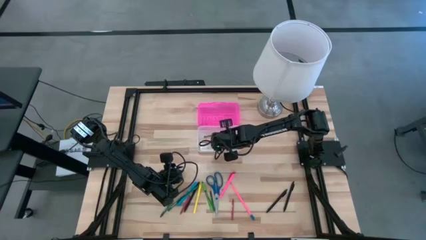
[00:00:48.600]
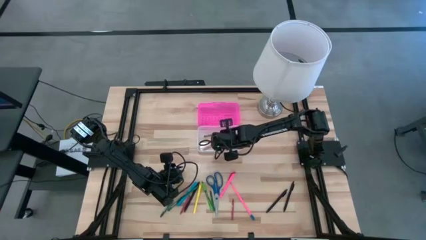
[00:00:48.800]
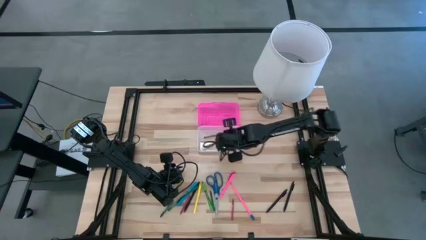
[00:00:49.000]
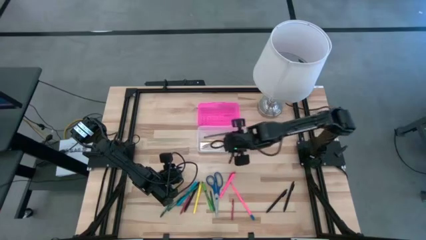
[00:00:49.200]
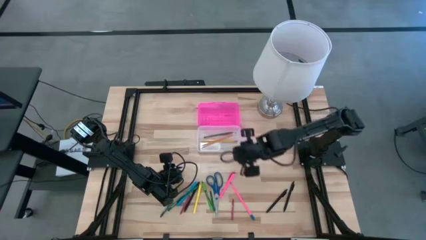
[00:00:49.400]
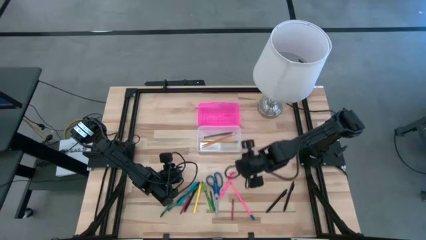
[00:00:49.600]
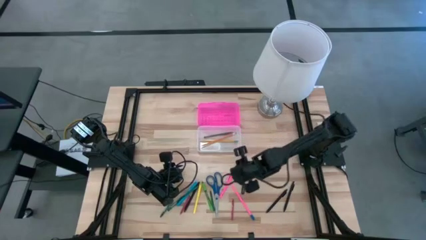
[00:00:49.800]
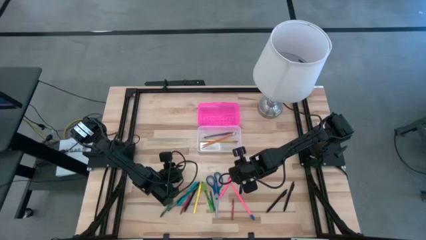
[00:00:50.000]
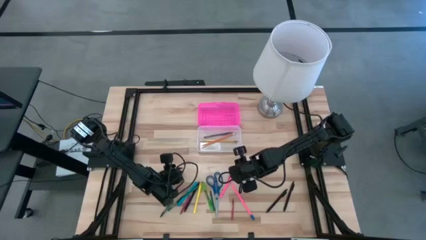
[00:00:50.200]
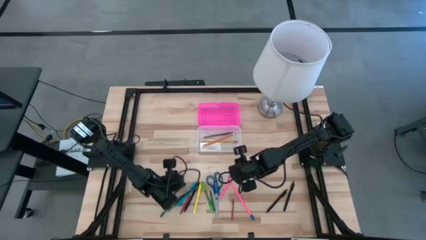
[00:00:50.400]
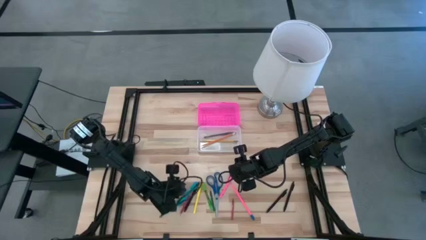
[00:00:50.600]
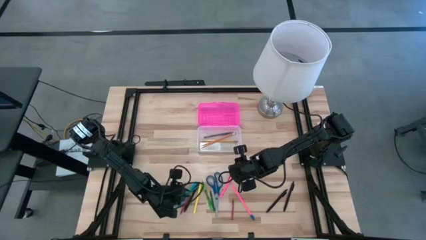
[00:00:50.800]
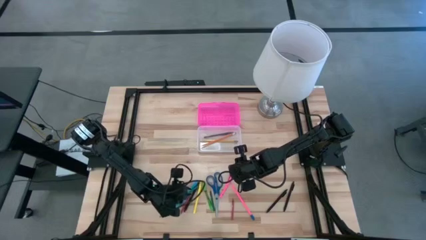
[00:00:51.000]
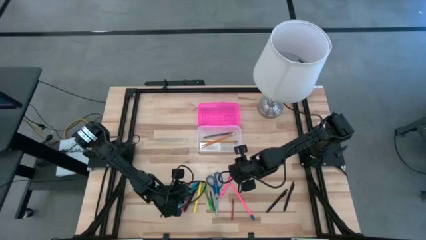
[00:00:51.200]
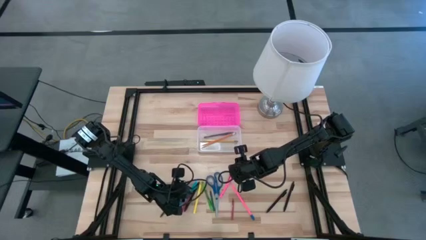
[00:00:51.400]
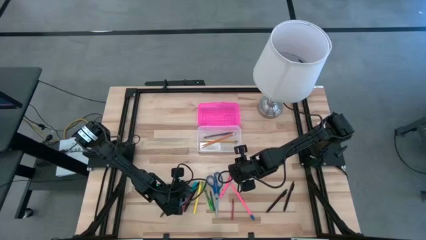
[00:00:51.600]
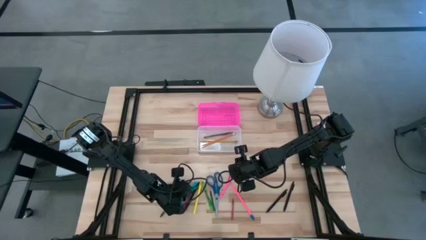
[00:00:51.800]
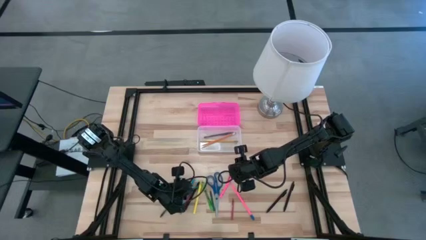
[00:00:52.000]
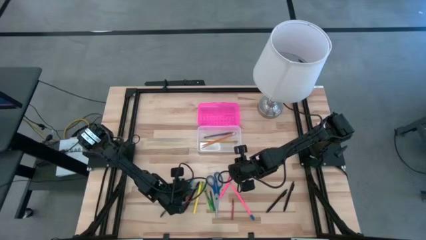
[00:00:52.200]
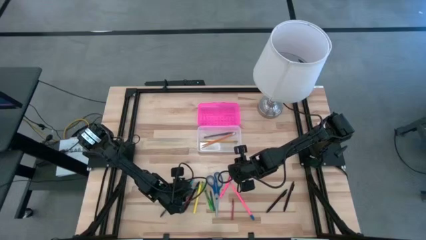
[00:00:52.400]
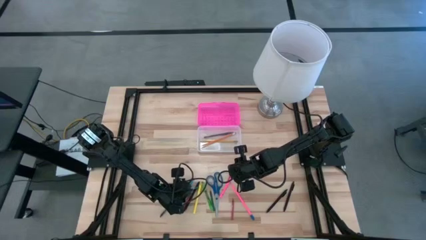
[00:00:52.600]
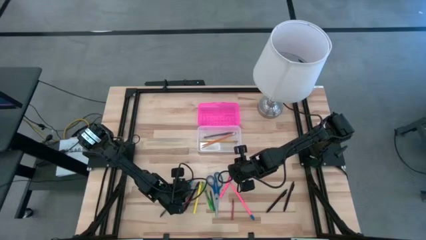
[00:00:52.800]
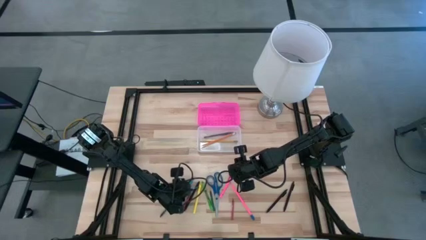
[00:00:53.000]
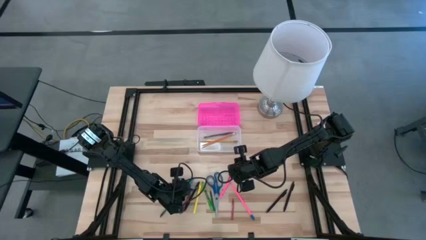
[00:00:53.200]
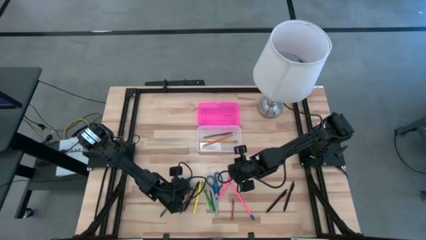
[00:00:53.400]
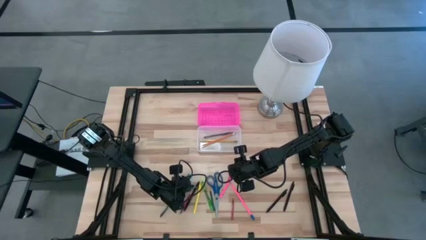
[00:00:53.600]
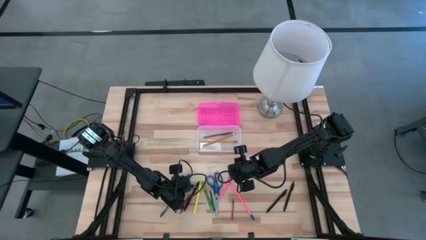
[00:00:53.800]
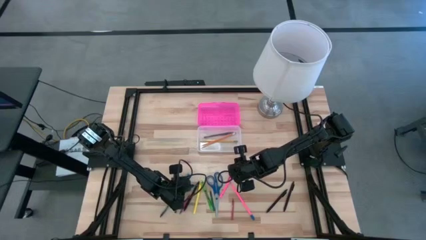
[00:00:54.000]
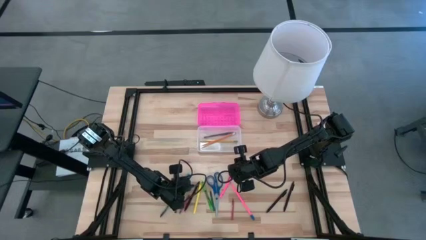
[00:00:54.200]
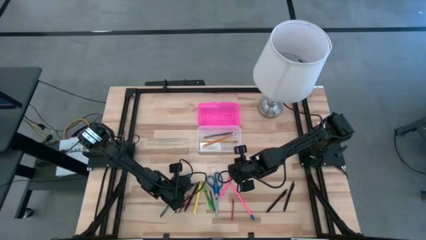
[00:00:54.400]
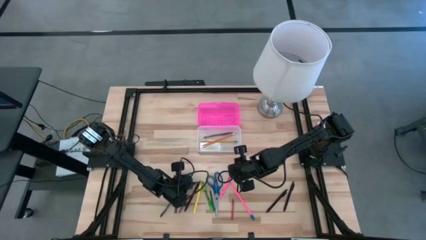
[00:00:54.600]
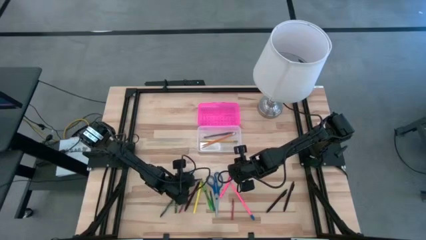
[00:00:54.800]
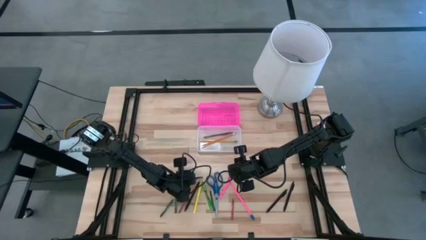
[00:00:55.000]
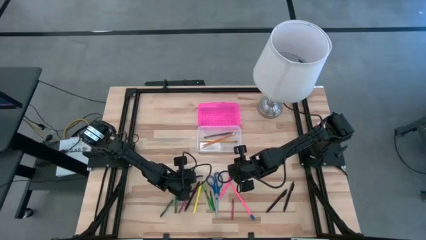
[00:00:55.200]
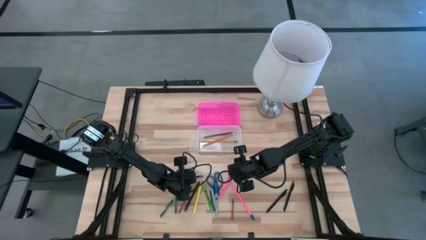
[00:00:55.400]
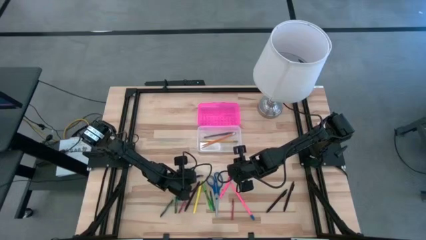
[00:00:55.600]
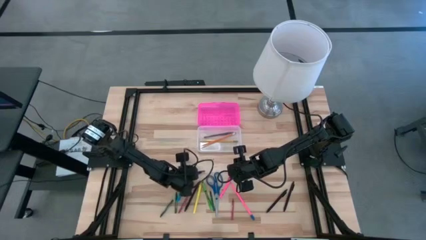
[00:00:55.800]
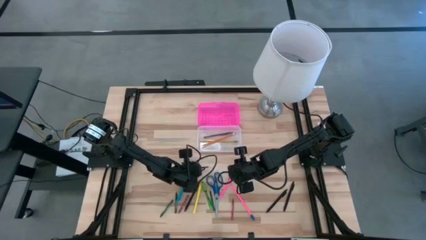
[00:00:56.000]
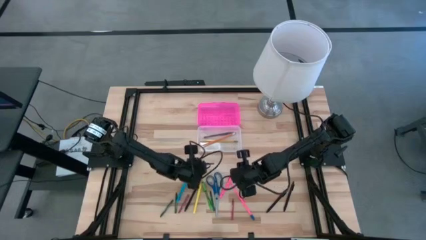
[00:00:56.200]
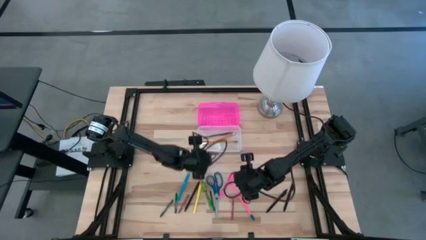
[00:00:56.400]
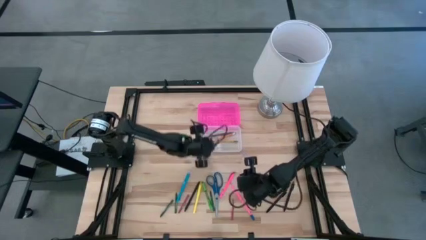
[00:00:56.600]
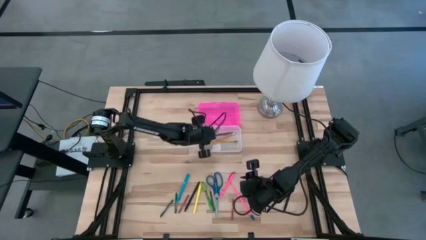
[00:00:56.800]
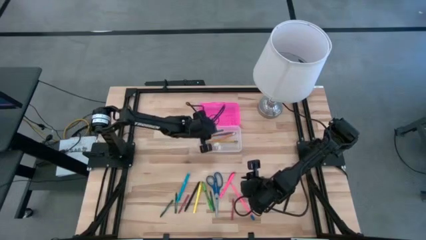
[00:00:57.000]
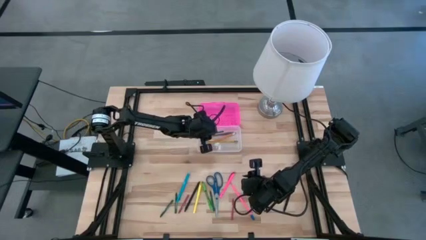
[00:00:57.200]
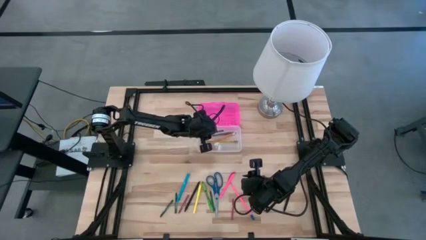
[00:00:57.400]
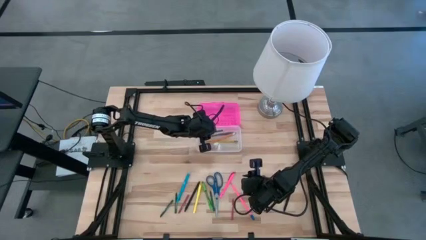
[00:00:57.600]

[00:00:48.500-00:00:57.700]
Task: Pick & place school supplies into a supply box
Put the right green crayon into the supply box

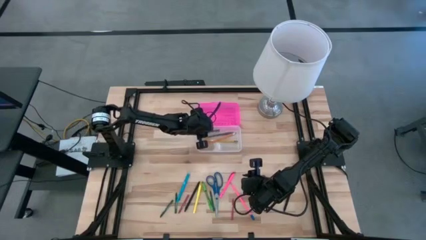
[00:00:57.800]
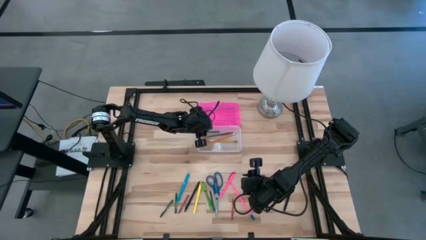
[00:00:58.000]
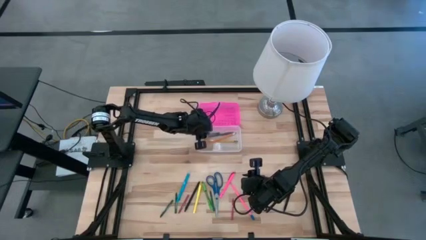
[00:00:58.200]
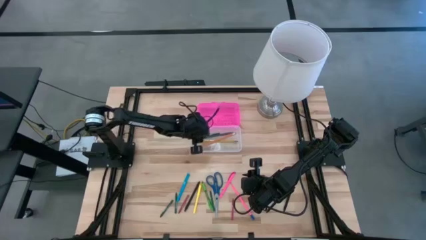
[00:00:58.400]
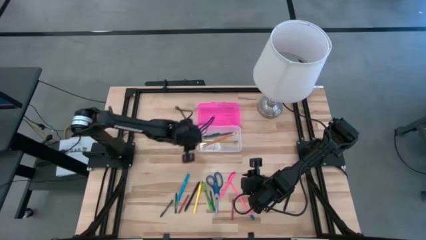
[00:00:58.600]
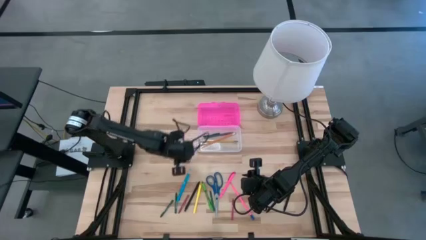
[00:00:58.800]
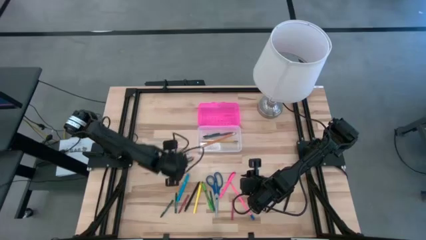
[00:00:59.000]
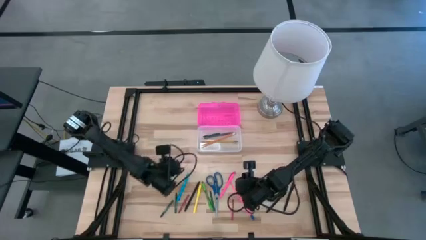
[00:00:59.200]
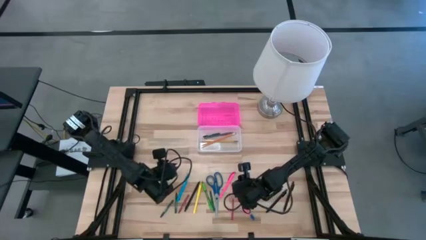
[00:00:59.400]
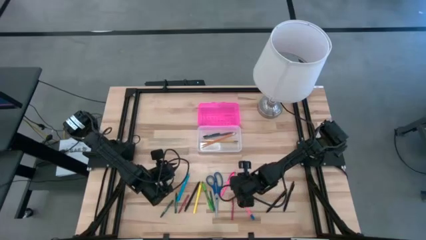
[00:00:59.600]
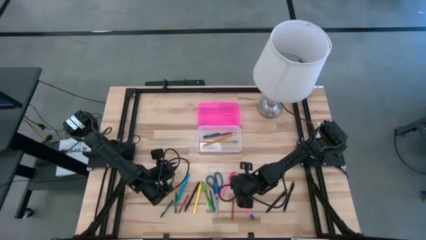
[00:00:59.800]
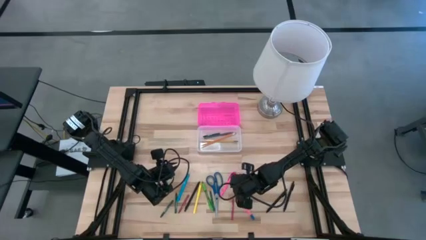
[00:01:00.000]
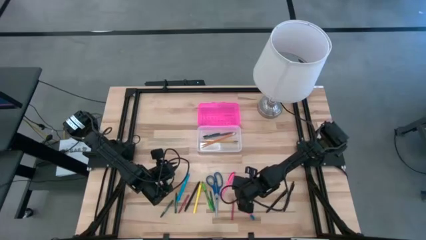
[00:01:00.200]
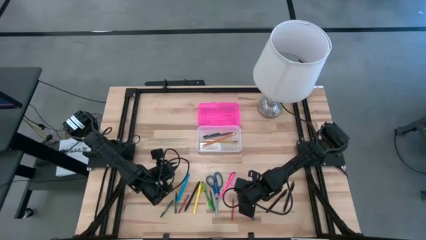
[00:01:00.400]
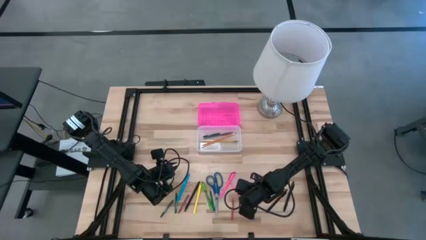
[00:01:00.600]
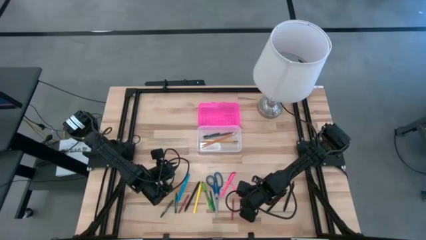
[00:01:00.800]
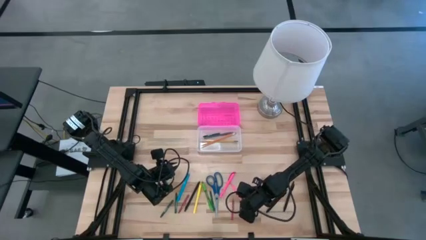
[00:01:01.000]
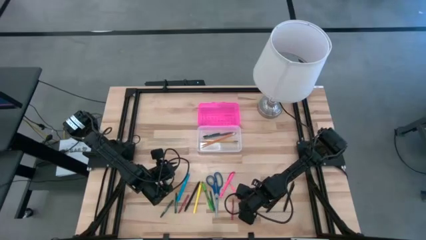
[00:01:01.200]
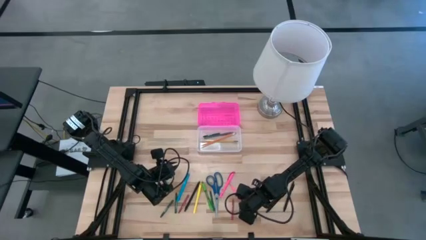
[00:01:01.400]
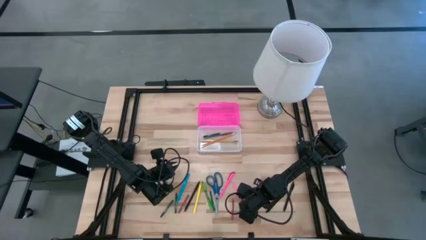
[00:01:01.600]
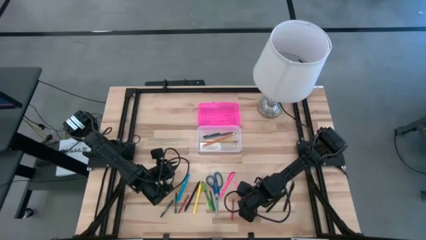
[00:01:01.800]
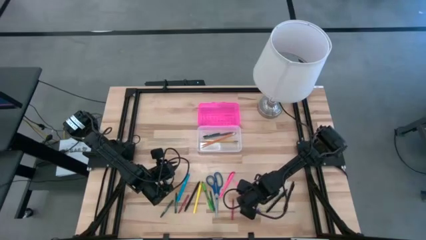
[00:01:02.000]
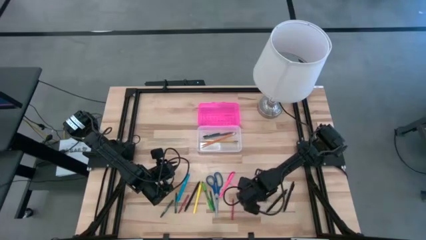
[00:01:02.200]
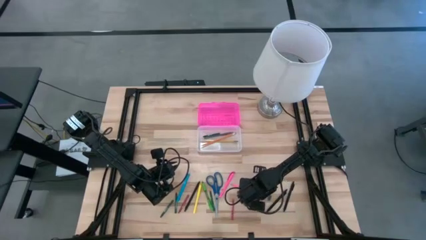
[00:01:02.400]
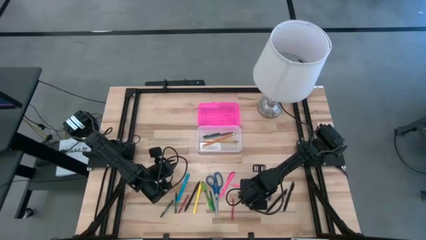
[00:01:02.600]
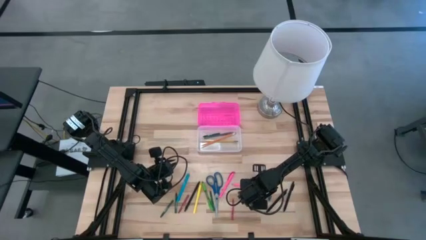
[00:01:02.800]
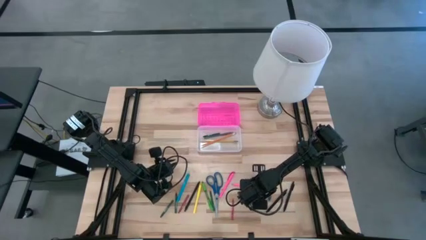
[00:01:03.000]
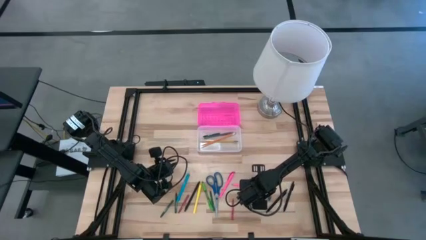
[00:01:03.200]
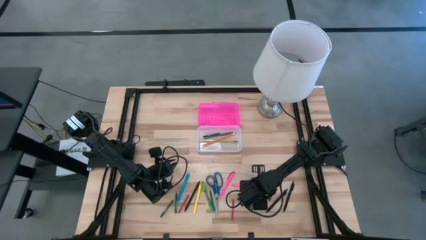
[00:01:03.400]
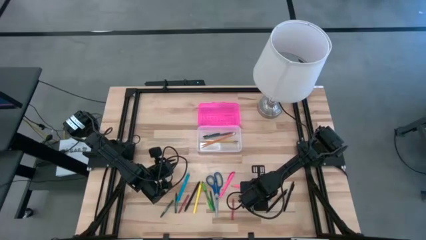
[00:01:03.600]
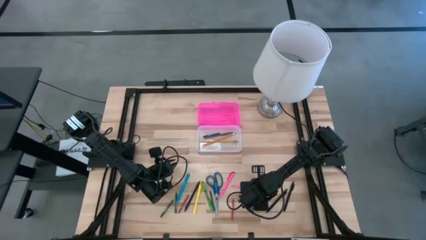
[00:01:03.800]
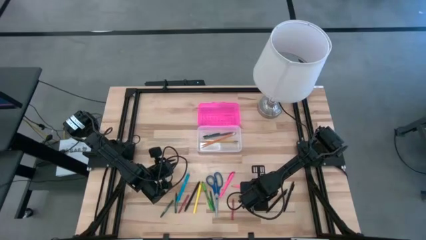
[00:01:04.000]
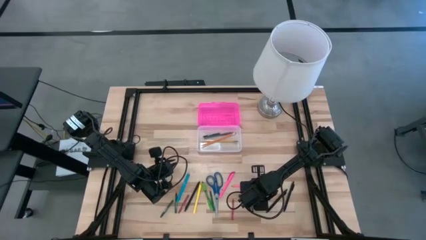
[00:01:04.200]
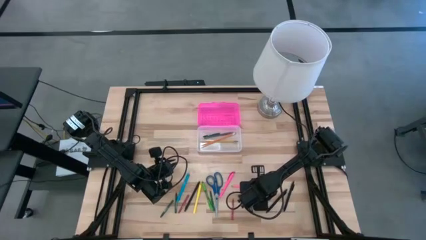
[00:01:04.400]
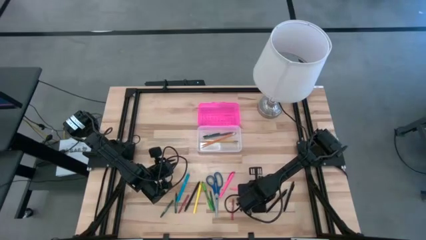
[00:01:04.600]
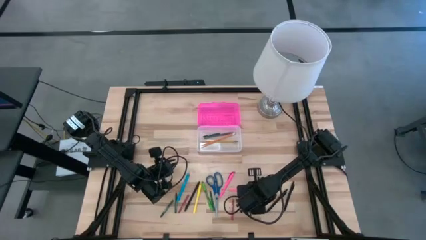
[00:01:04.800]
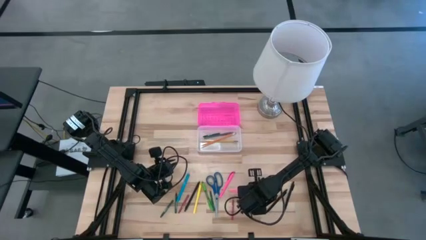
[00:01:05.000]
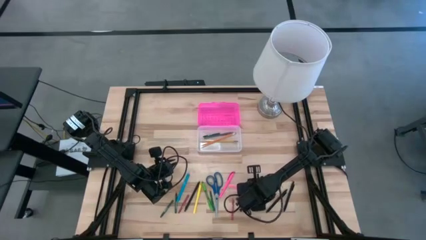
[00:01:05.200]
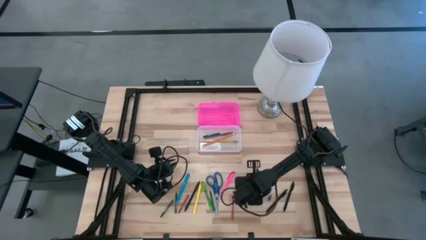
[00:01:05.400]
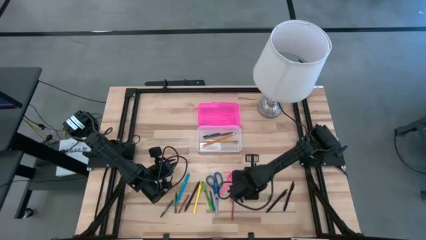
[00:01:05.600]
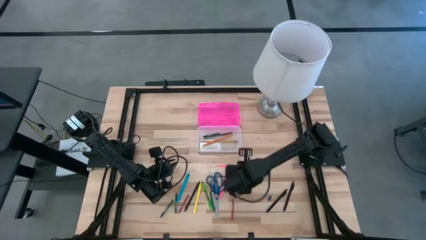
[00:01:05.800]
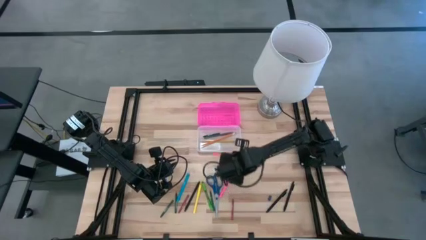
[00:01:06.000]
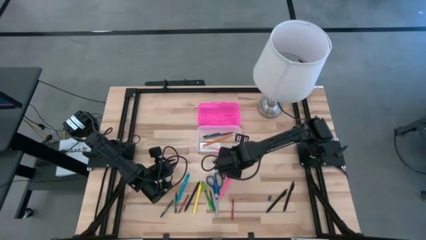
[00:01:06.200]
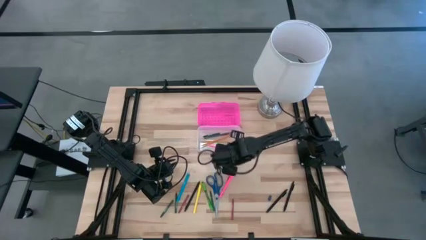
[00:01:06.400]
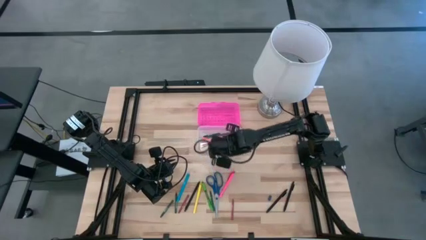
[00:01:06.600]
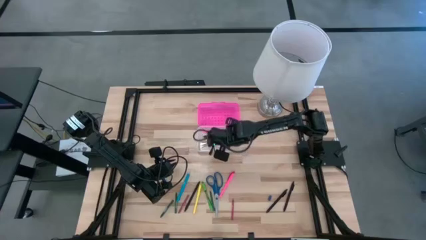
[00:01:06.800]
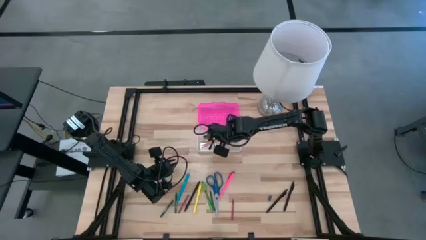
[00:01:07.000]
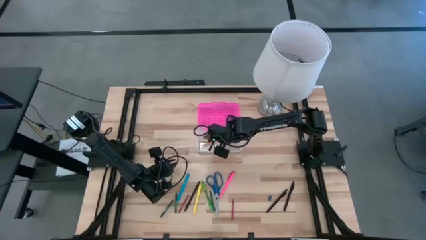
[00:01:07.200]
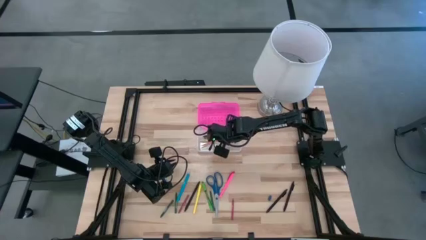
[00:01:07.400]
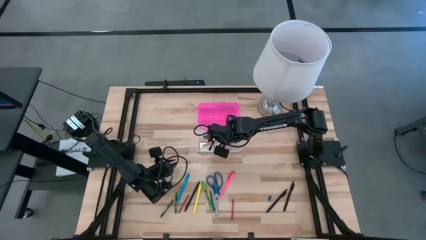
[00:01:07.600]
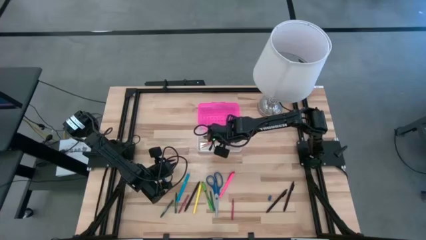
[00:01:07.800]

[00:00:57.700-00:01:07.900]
Put the pink pencil into the supply box
